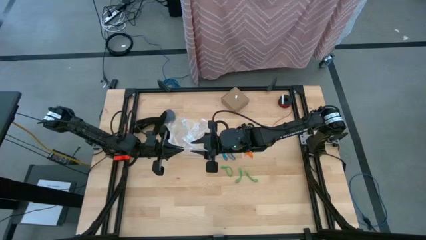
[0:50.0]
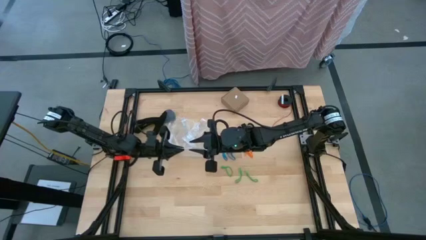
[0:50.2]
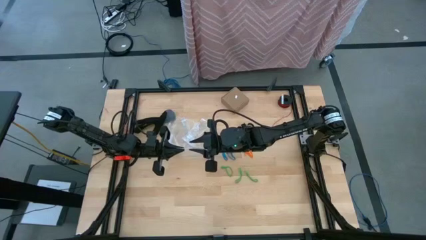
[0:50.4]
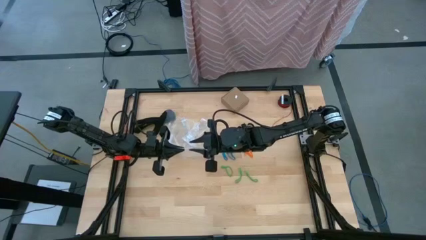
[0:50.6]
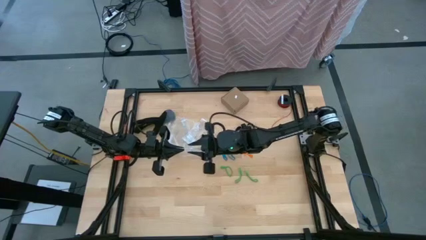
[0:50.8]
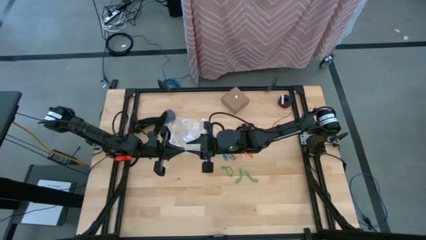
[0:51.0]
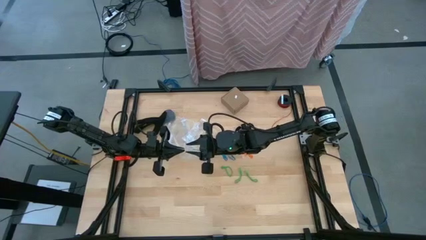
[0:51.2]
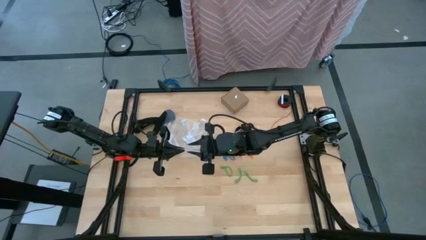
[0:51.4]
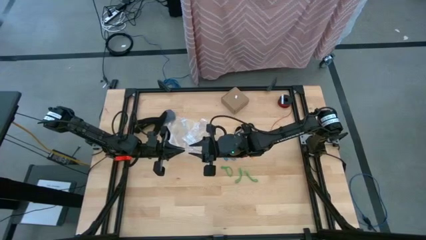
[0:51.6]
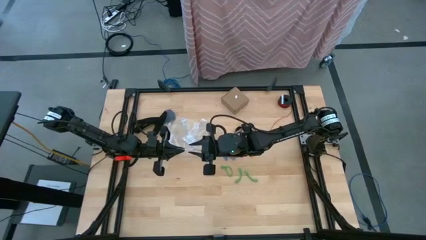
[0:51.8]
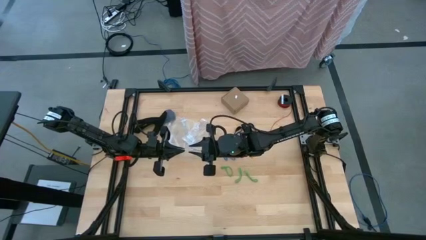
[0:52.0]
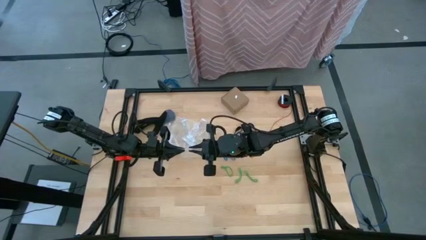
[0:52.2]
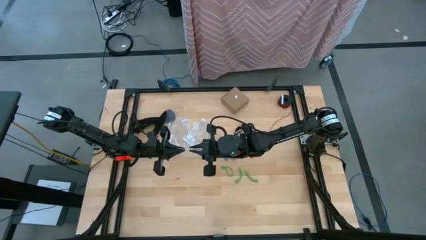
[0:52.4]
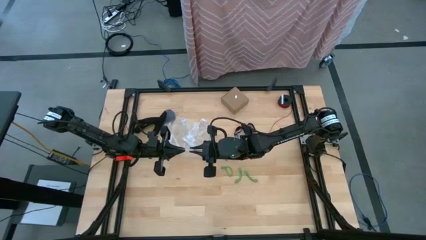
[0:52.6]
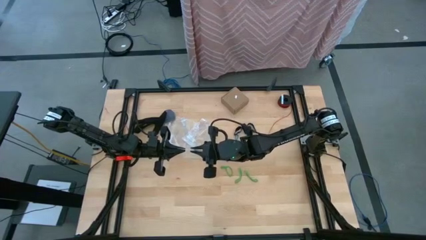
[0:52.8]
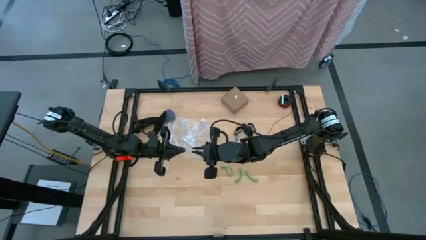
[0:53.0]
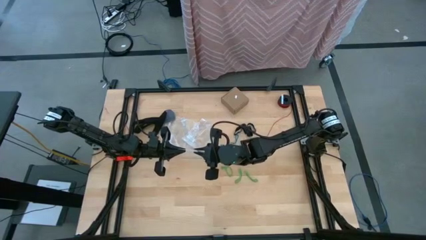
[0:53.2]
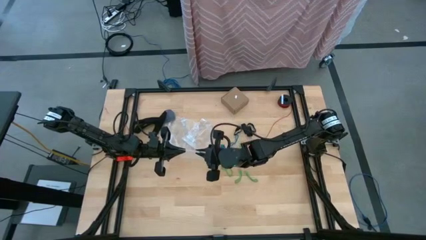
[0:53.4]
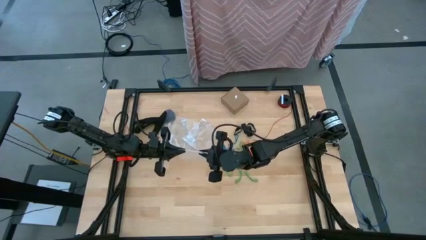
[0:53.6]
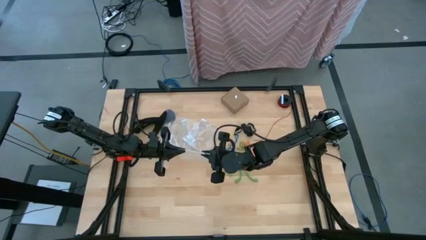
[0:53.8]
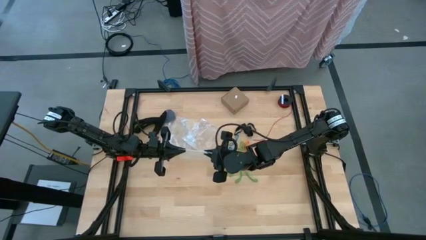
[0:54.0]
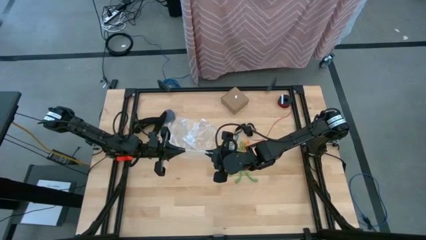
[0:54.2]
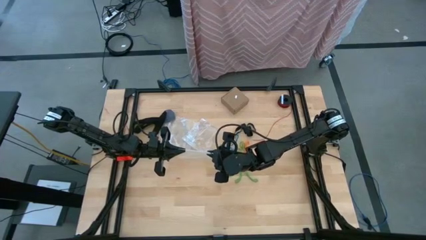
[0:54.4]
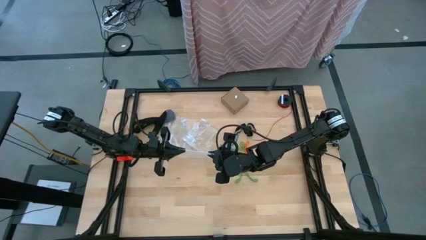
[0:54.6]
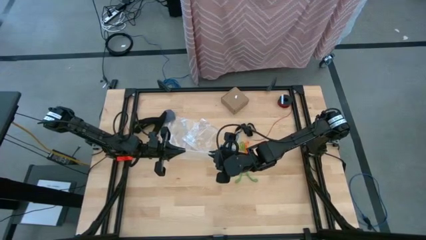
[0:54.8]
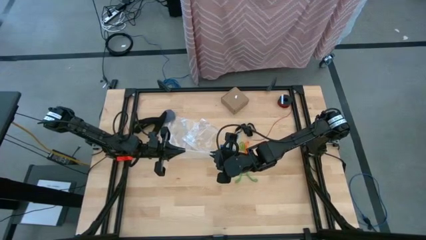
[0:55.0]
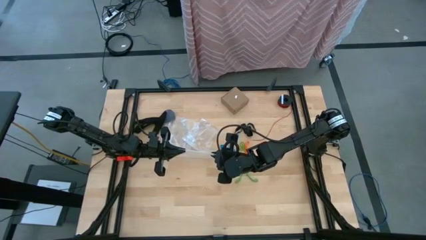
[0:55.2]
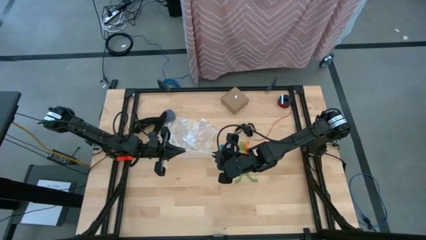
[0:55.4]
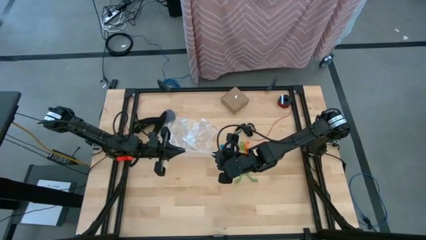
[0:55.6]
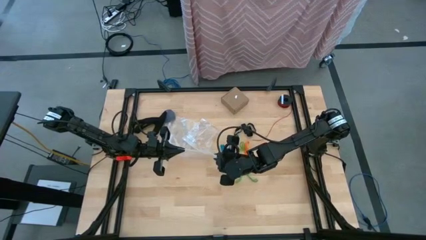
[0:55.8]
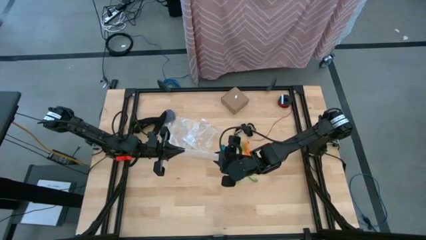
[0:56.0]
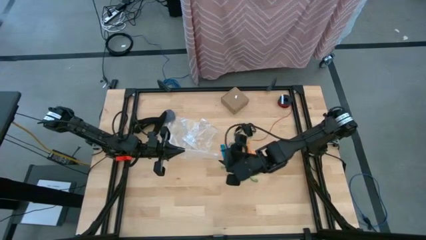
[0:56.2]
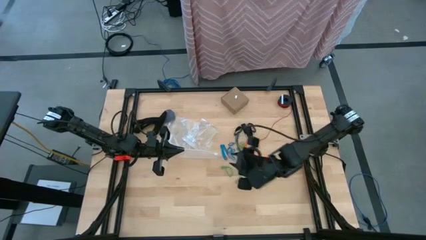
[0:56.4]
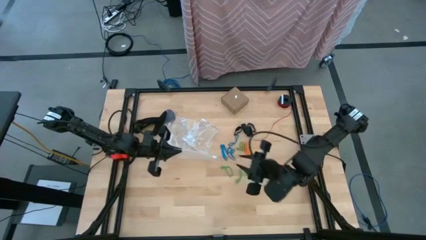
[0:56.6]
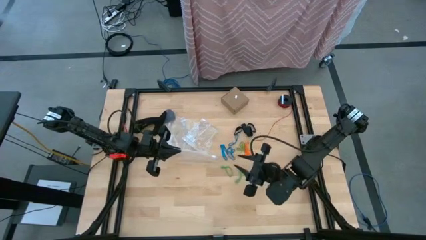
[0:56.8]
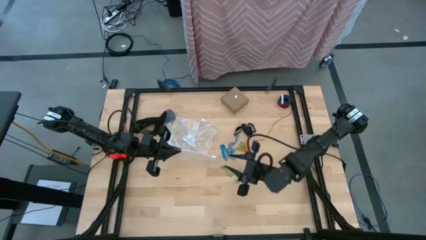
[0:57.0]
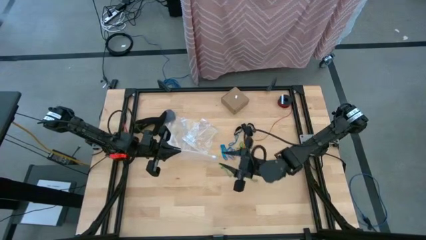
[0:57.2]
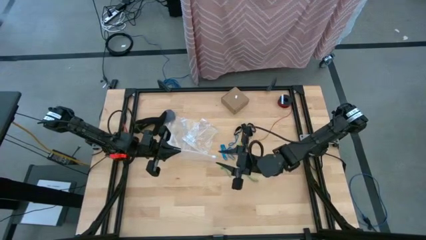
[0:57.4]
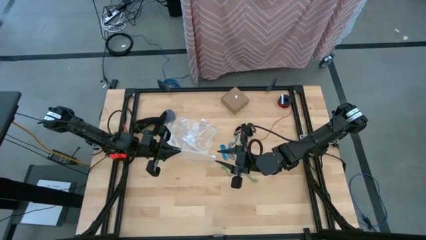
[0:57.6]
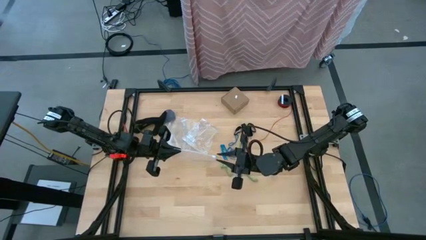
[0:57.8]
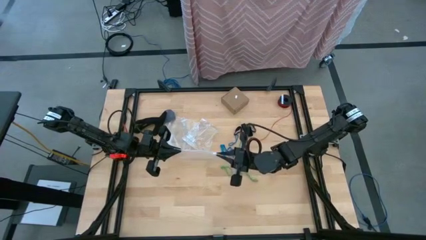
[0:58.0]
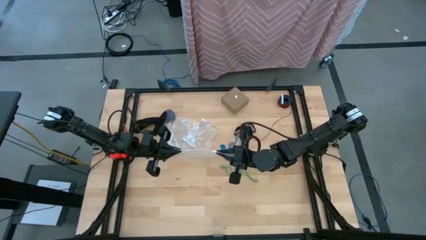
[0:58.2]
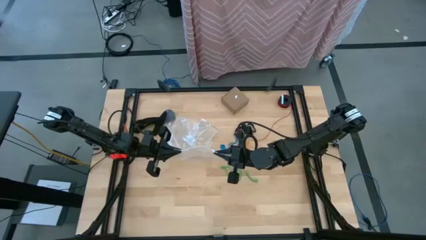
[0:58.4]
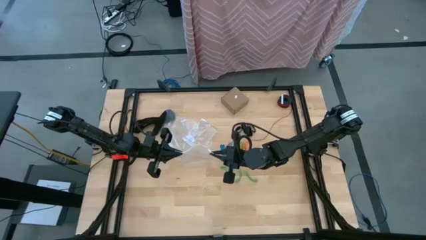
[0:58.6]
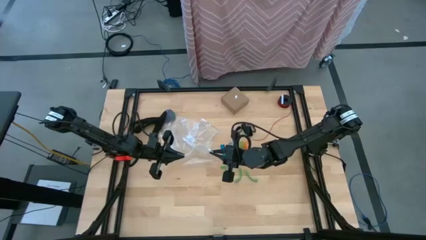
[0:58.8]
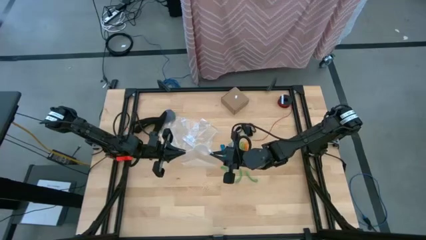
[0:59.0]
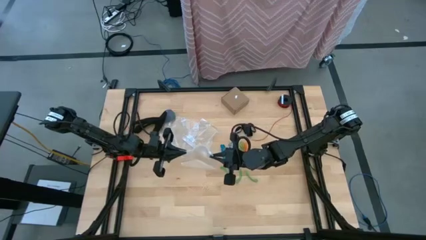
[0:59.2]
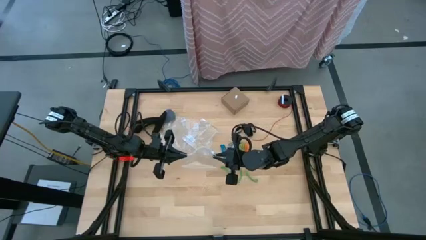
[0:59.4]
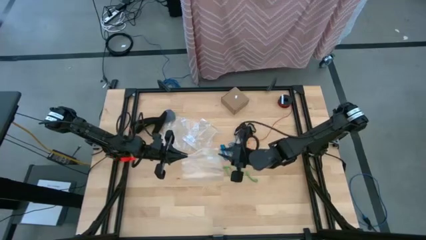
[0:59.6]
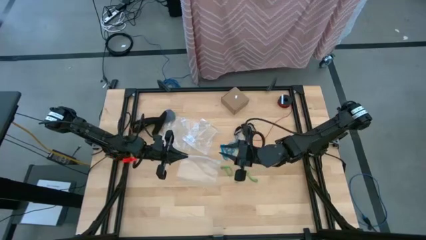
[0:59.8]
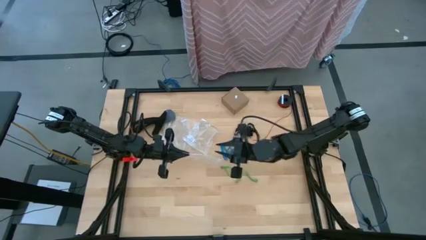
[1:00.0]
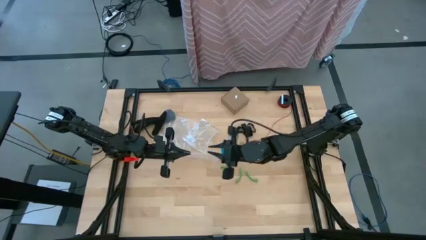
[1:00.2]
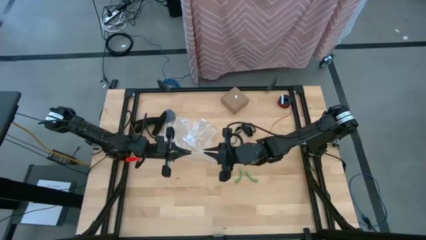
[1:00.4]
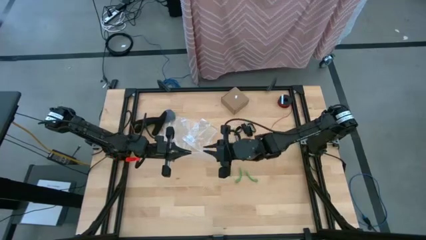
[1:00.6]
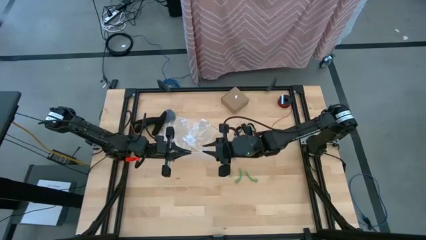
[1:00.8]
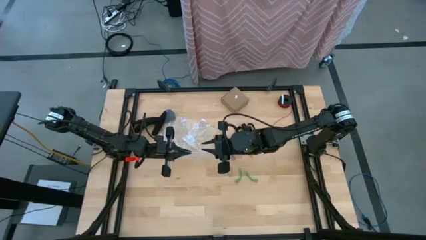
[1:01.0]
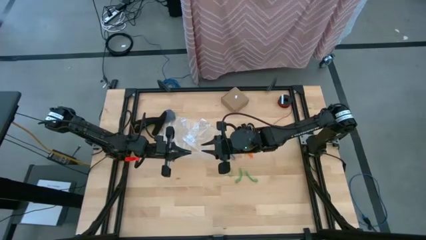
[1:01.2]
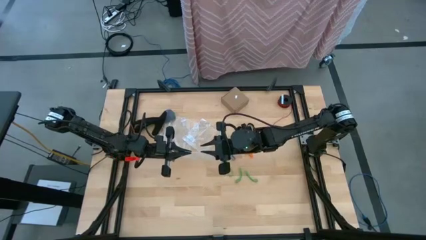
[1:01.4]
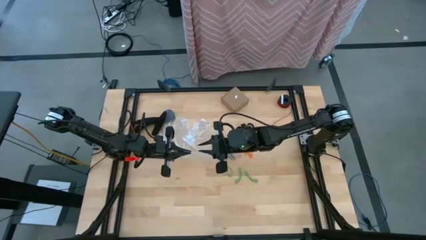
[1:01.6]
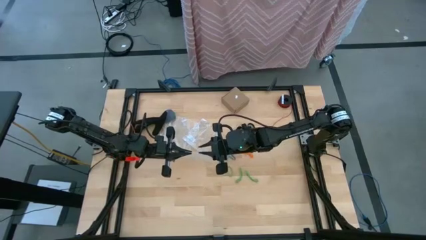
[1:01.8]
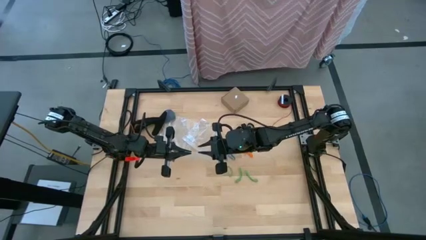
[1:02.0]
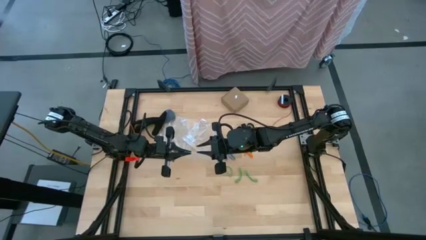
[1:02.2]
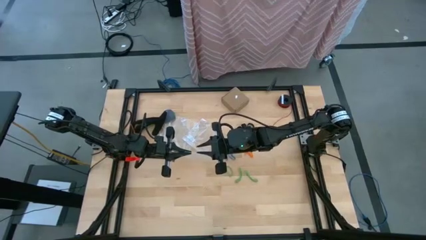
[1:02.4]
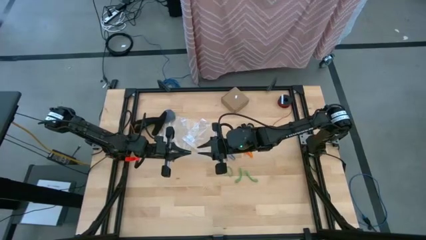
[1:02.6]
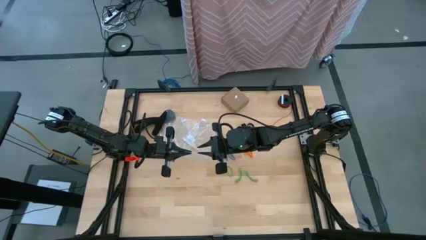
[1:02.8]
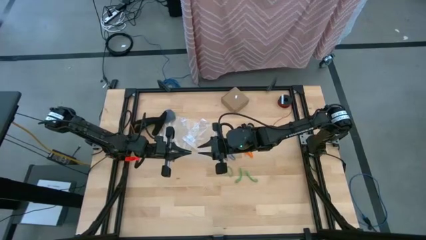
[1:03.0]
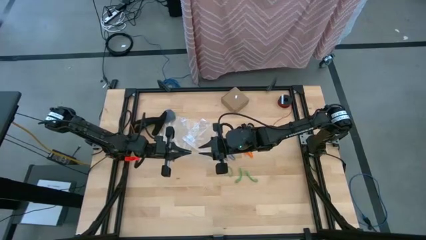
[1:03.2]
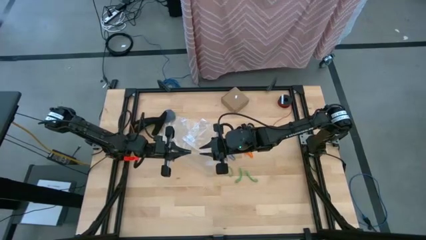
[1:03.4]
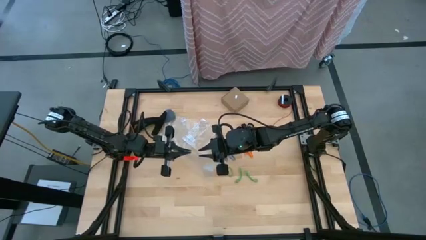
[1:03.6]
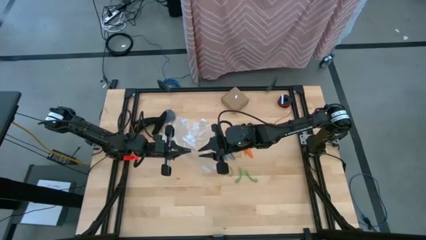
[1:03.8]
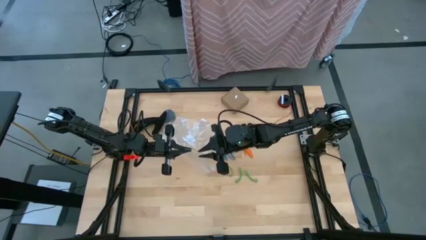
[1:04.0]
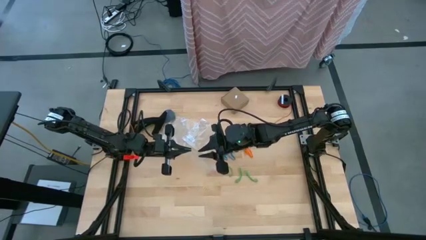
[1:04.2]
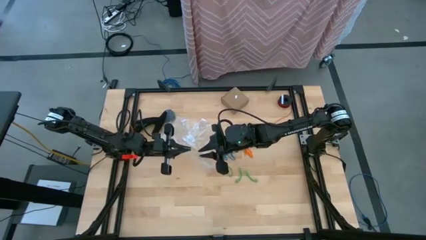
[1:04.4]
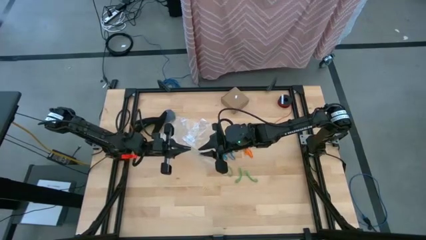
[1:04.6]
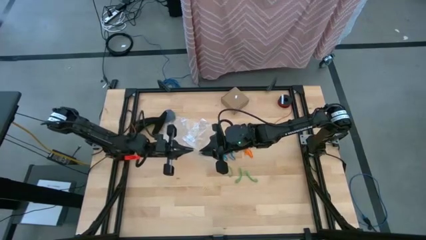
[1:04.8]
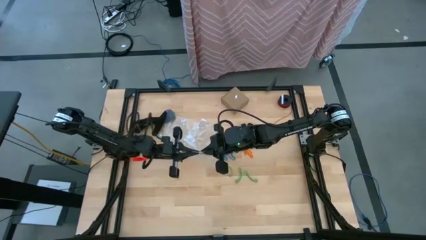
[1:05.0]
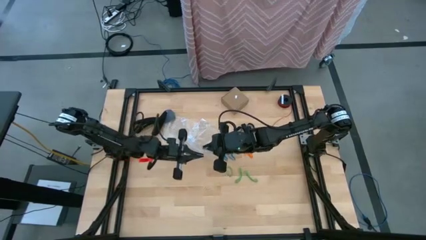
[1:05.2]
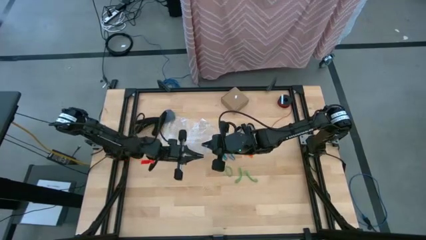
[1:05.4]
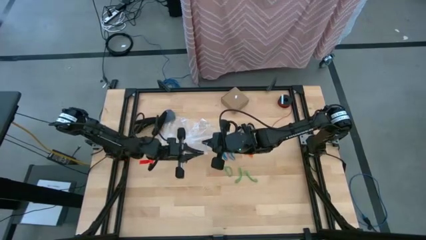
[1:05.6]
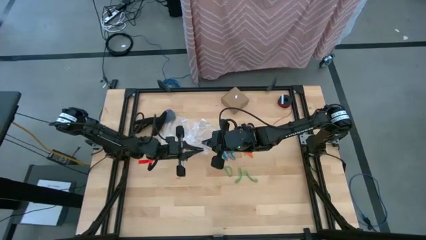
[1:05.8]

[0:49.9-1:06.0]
Task: Sort rubber bands
Open the transparent zip bag
